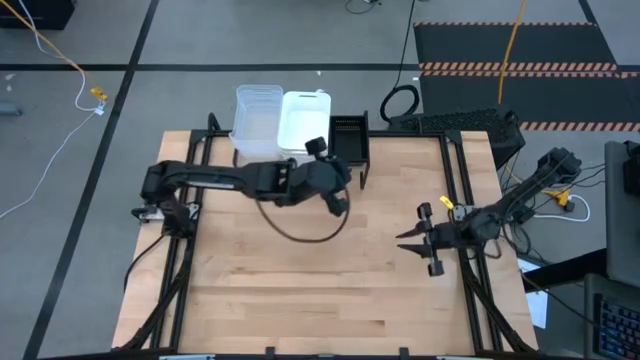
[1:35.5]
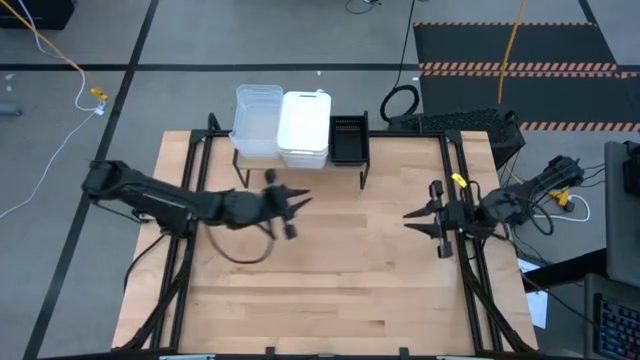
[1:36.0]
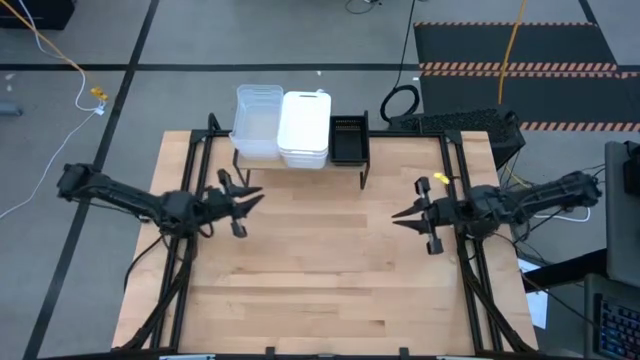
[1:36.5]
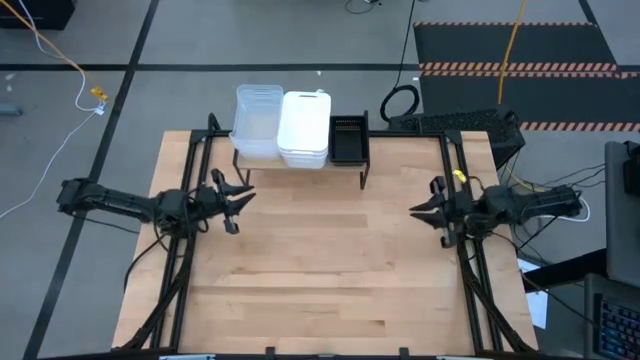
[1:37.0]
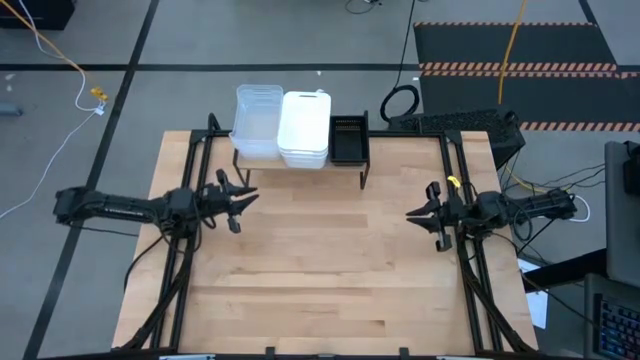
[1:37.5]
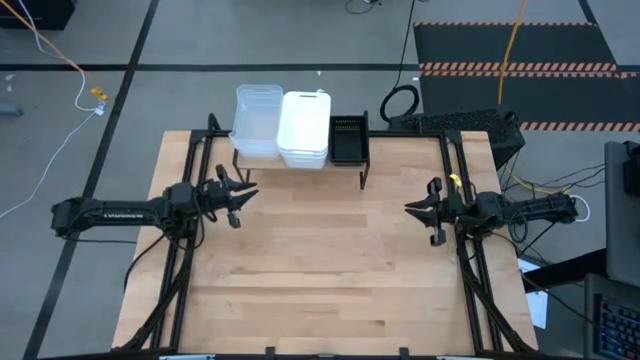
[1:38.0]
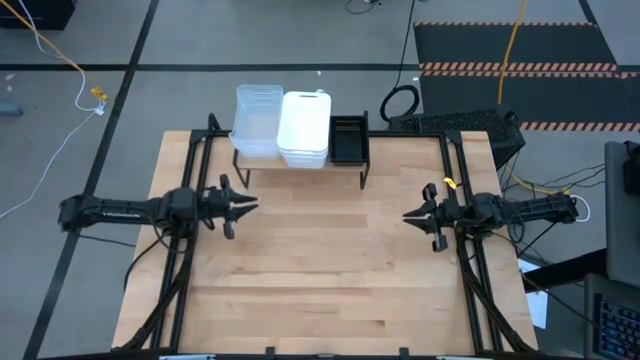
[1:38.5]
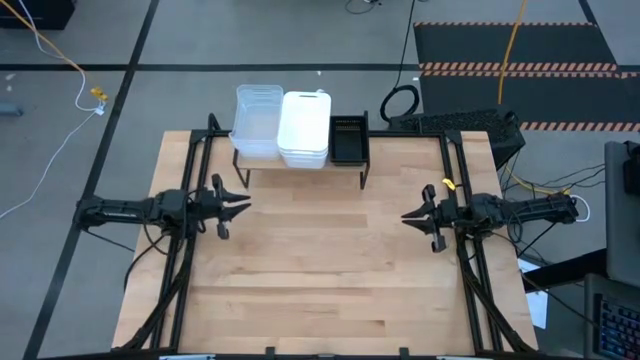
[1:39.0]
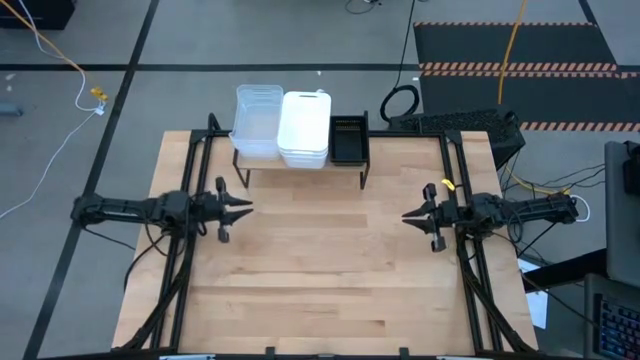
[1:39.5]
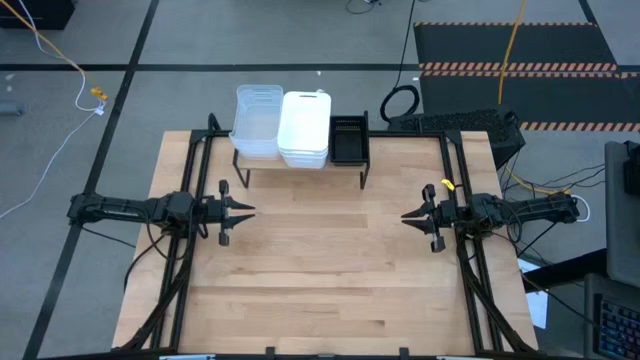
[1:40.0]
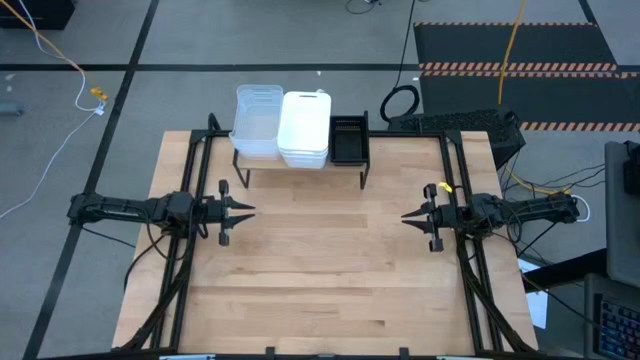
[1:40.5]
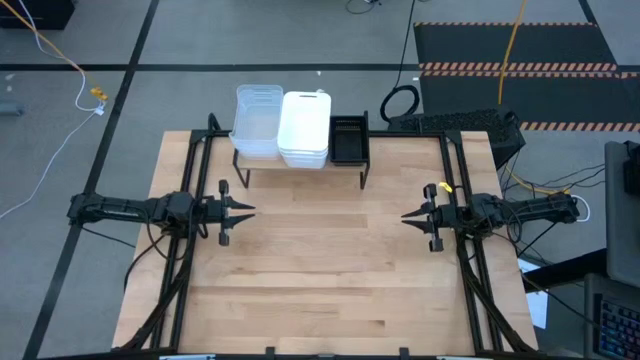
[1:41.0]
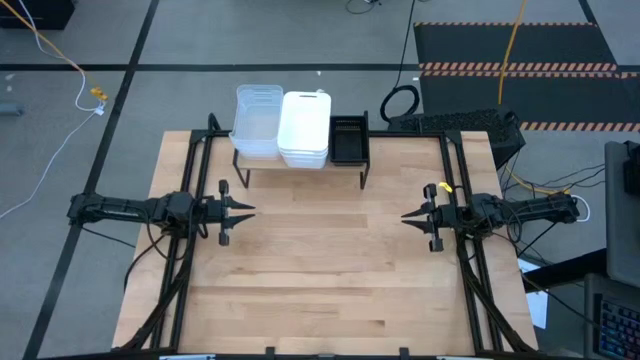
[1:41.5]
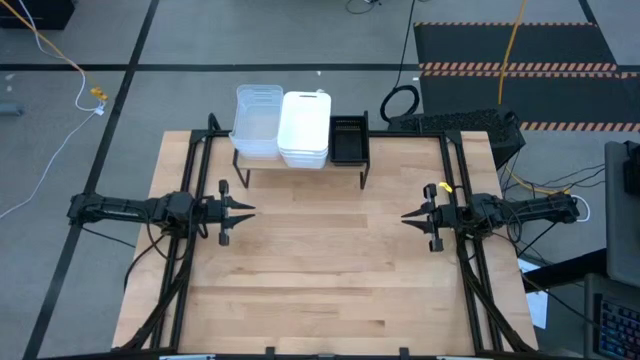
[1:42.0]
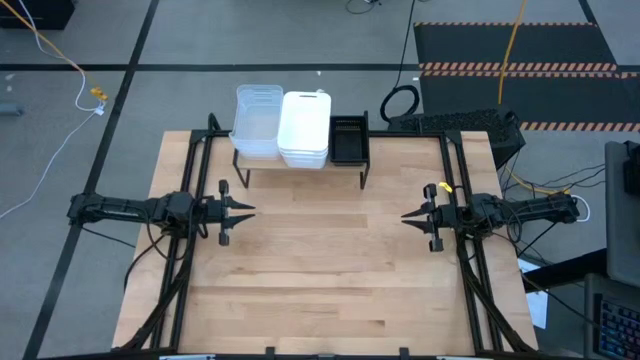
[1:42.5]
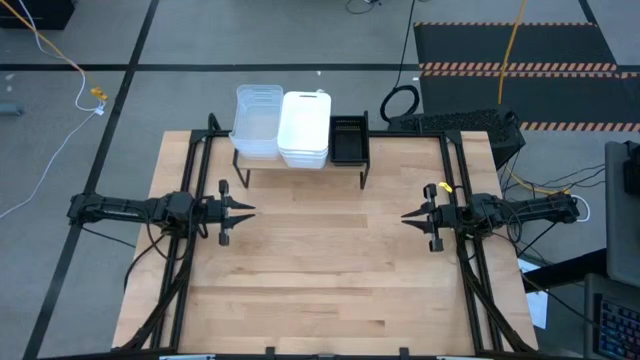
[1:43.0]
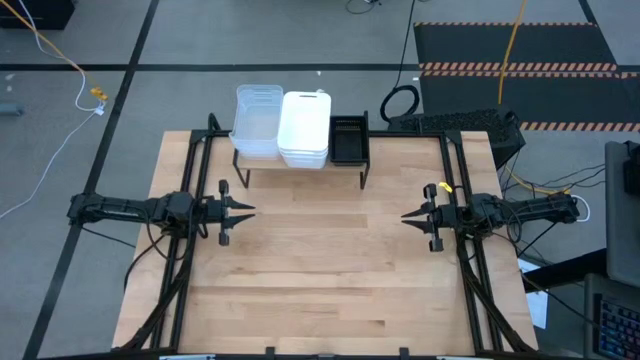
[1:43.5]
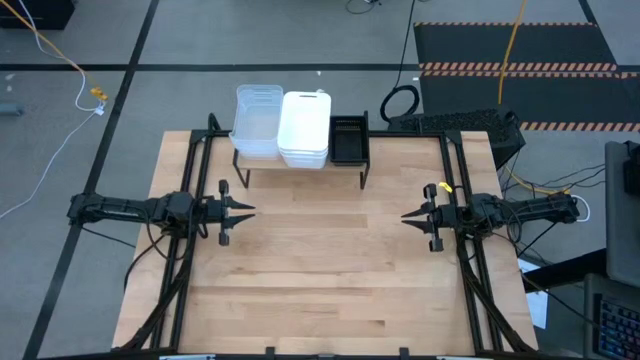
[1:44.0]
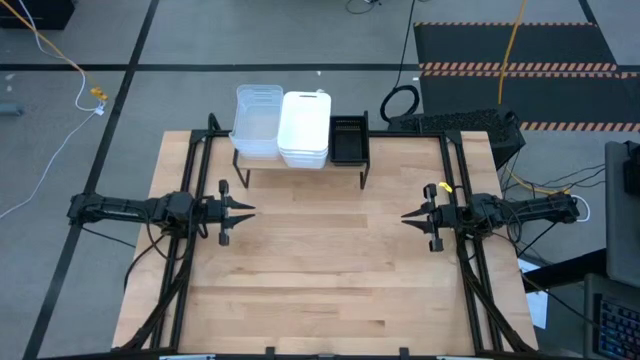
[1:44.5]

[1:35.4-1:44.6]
Task: Stack baskets on shelf by color
Return to Home Position

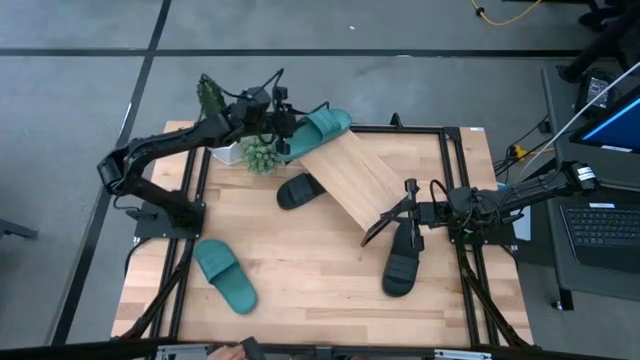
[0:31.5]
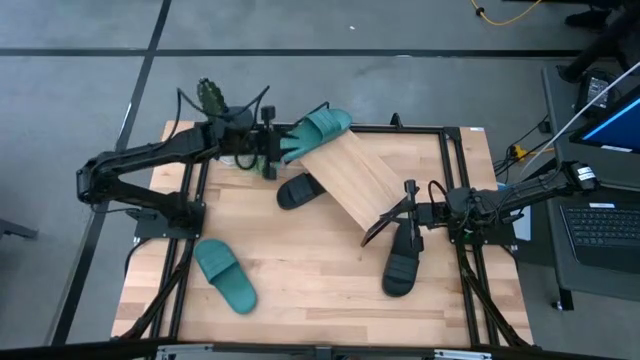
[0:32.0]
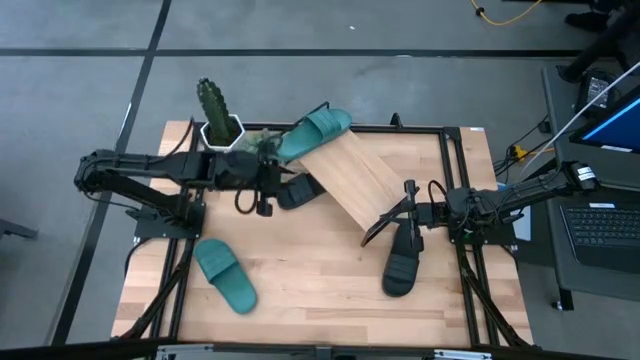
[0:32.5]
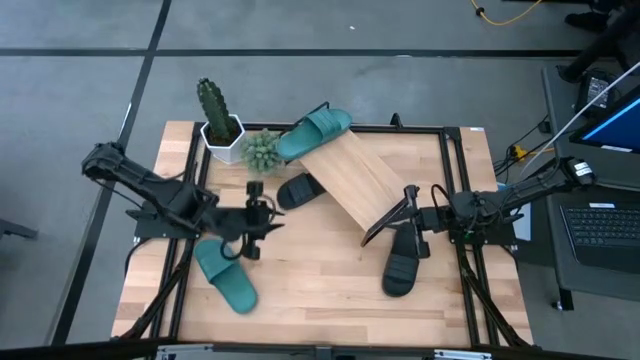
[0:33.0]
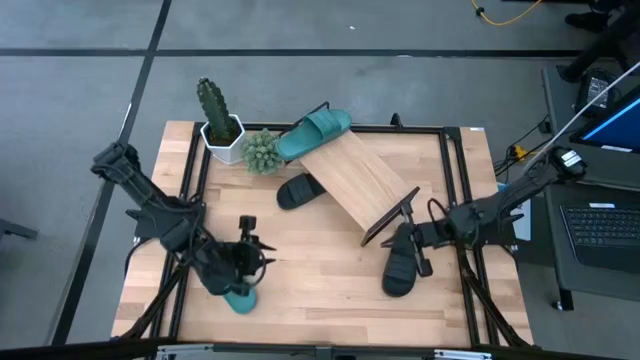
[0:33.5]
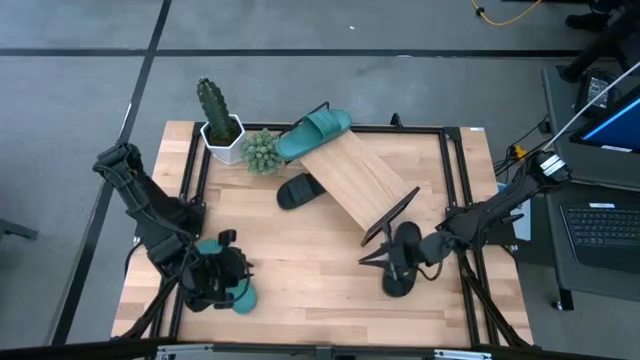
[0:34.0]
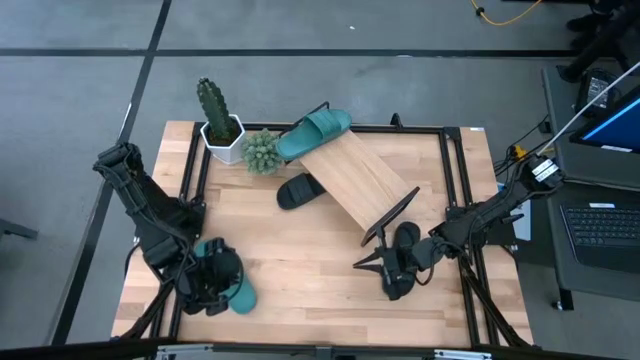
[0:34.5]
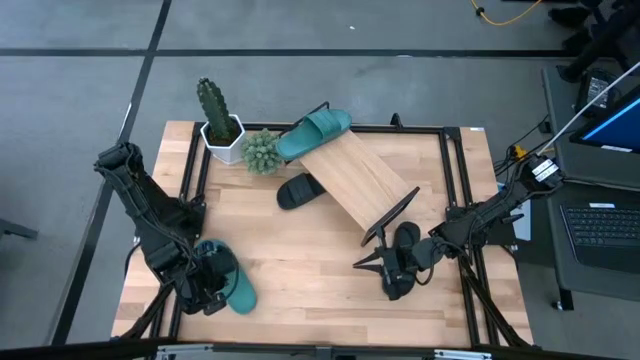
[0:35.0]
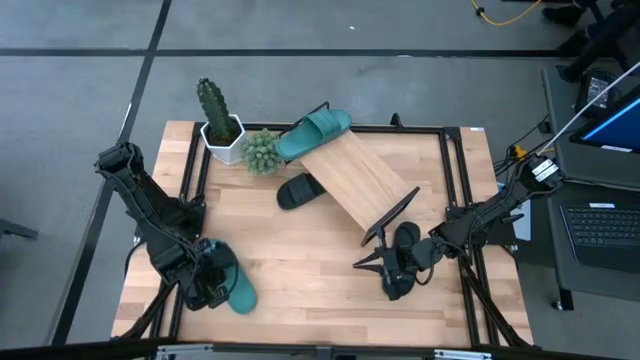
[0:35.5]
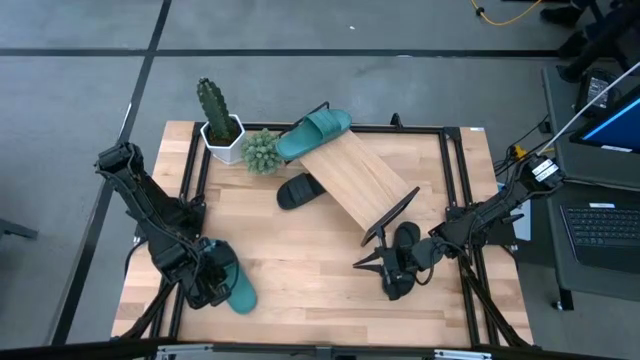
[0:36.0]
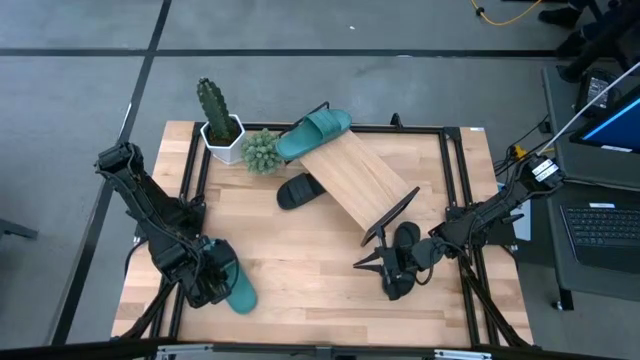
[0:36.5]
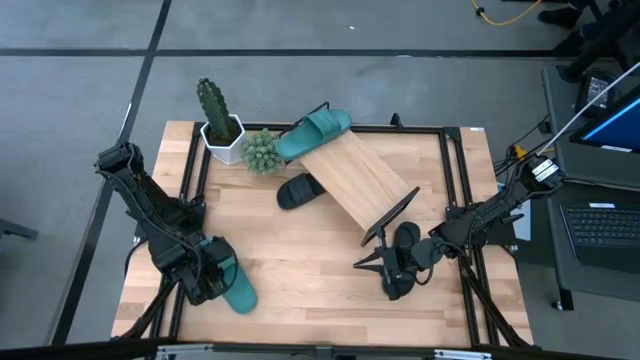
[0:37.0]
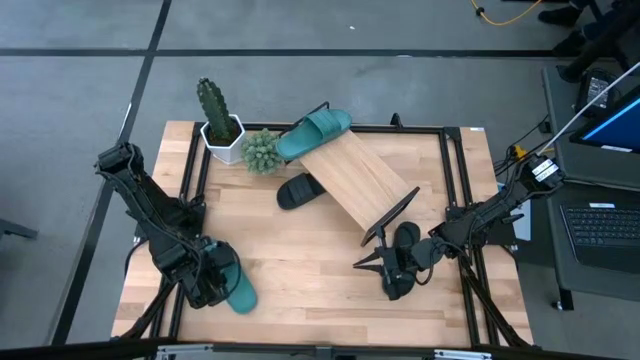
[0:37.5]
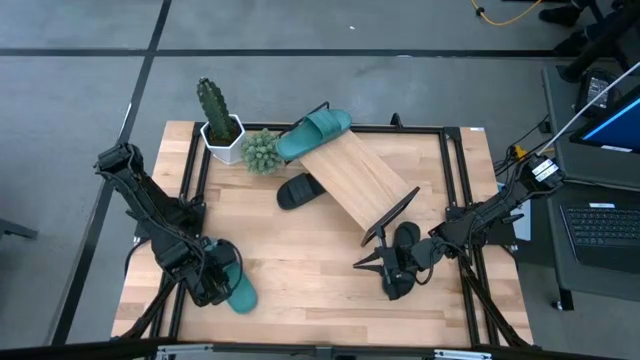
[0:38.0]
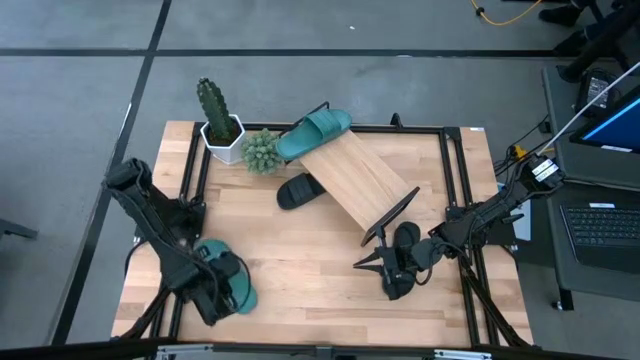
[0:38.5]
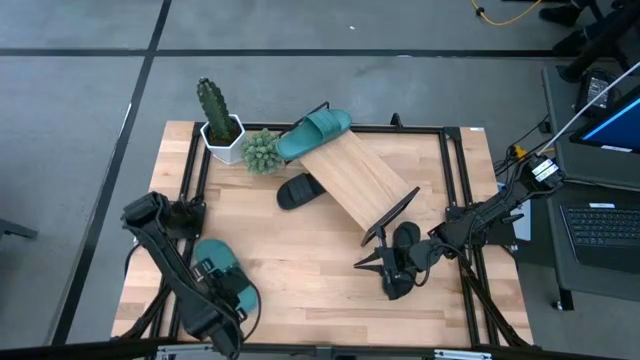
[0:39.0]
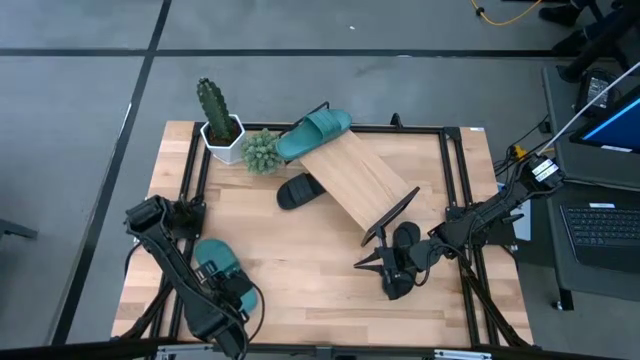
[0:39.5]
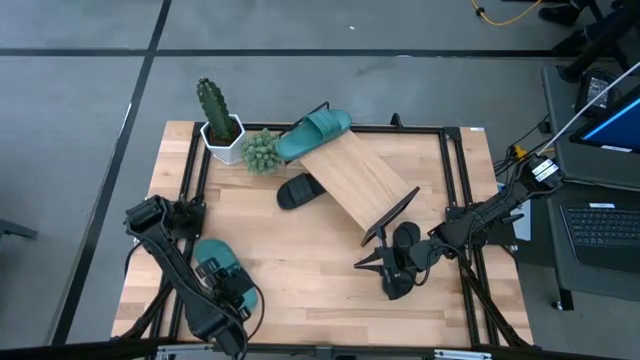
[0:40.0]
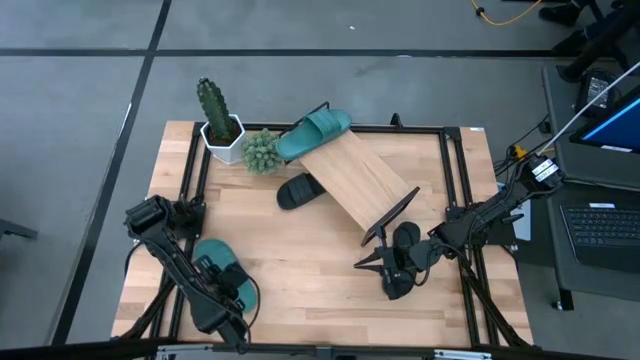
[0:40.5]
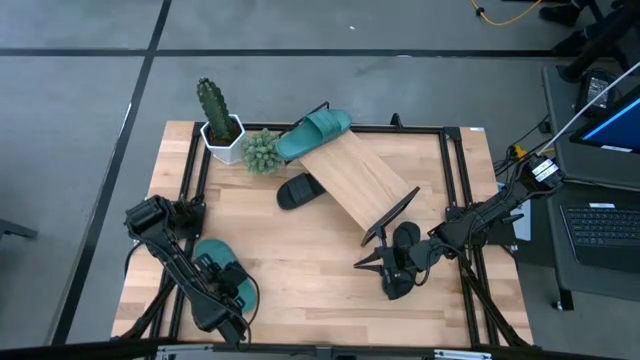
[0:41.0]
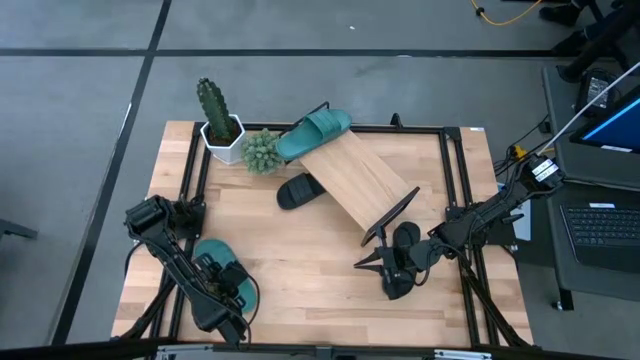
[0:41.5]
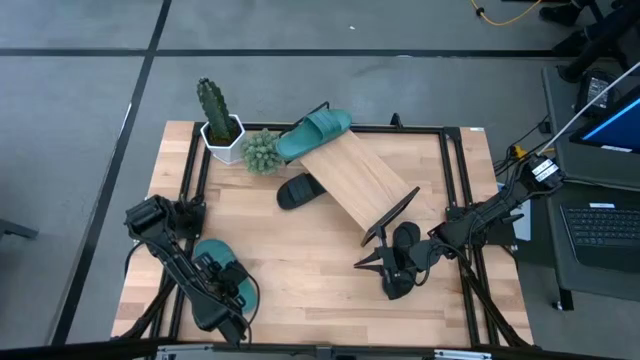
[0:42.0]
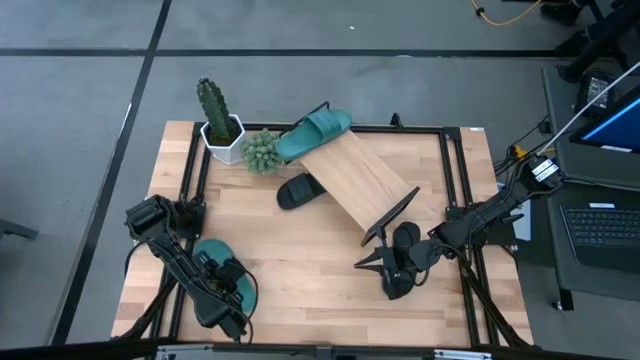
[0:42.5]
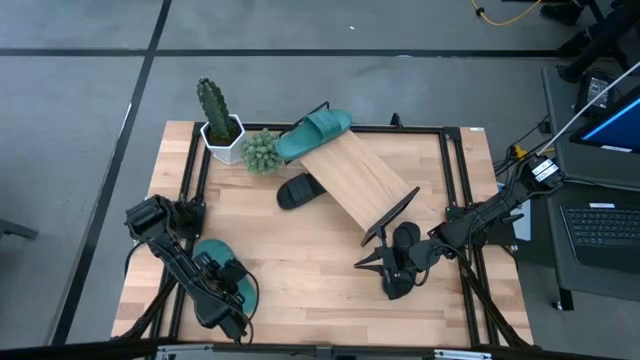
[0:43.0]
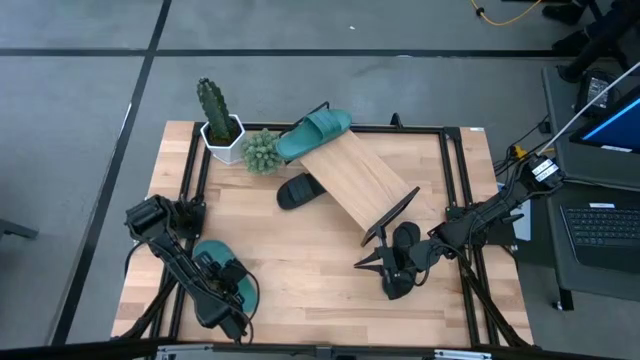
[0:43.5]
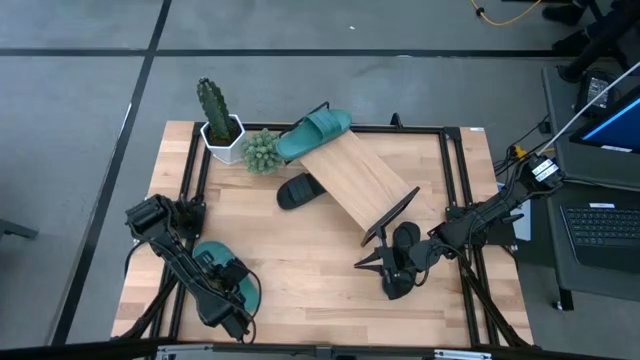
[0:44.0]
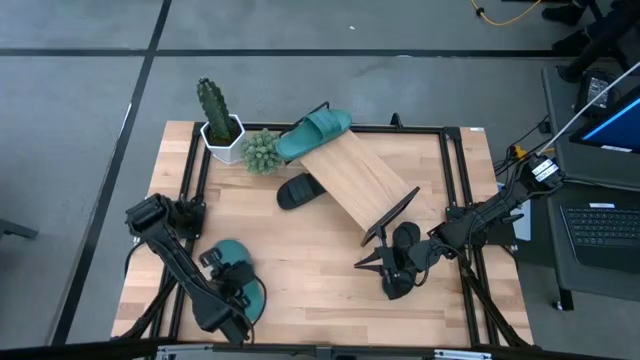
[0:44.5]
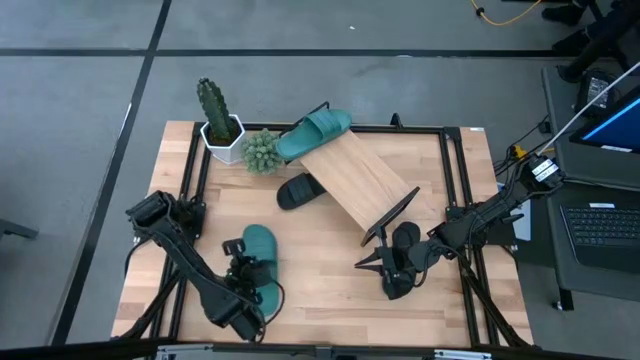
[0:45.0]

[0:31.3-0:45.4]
Task: Pick and place slides into the shelf
Put the green slides on the shelf
